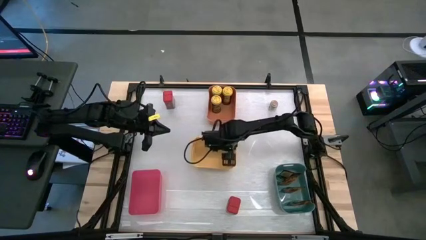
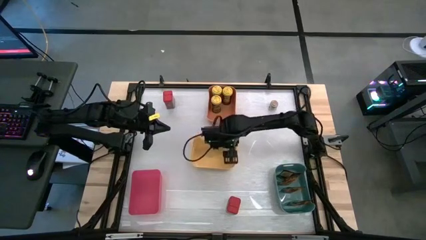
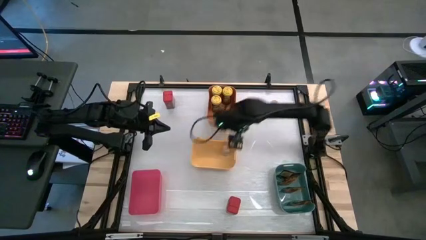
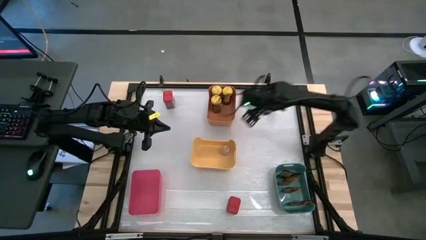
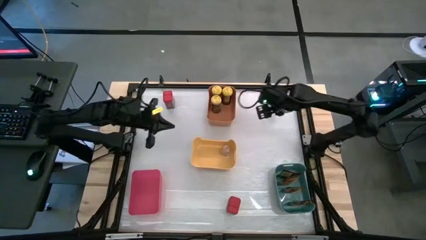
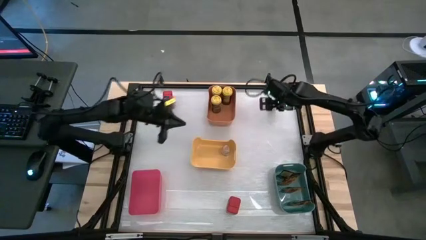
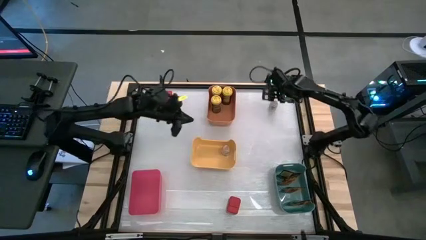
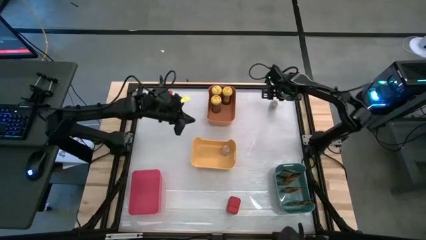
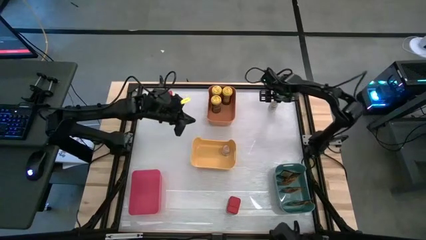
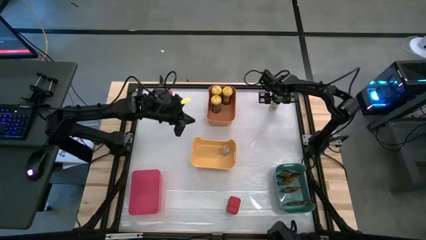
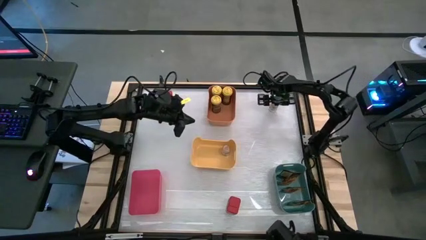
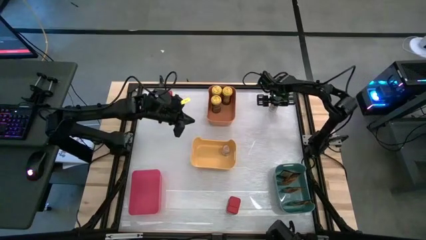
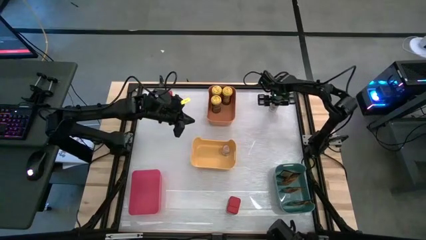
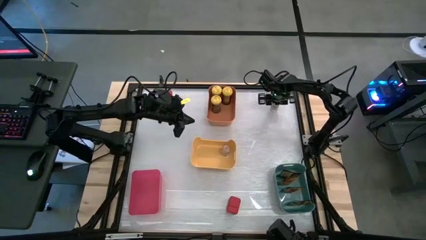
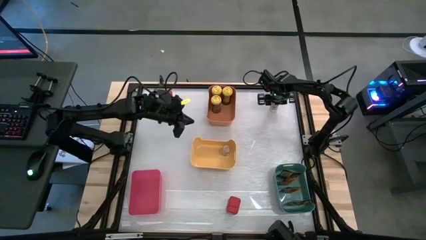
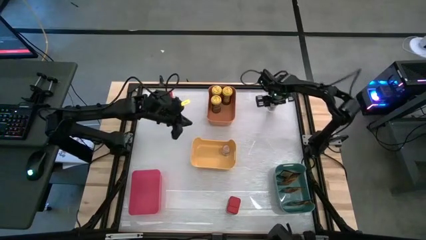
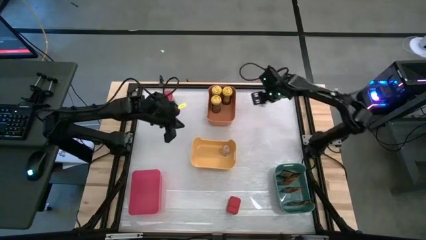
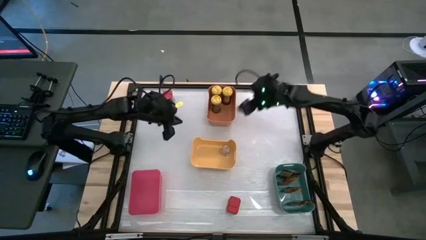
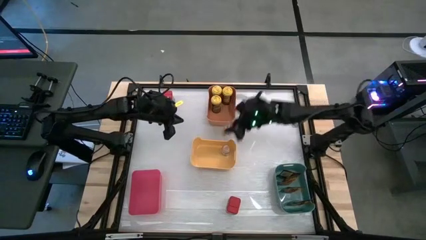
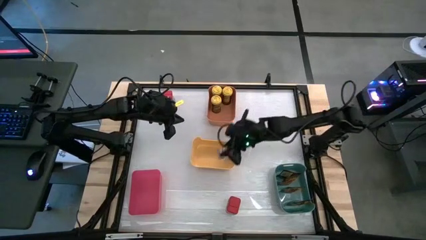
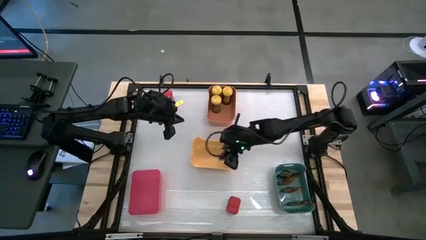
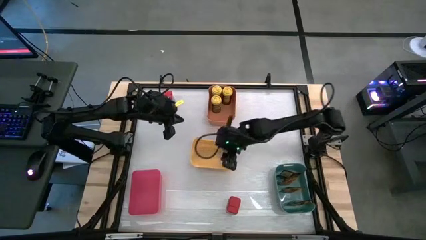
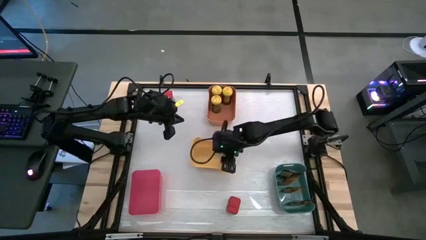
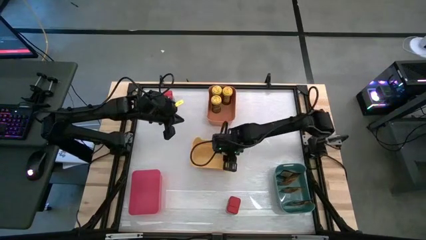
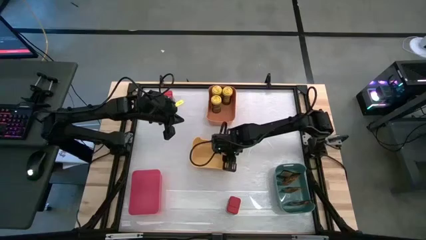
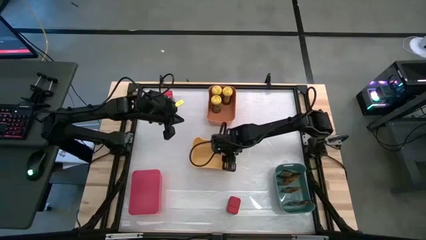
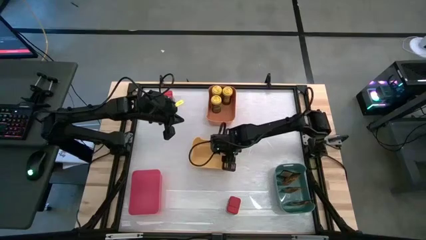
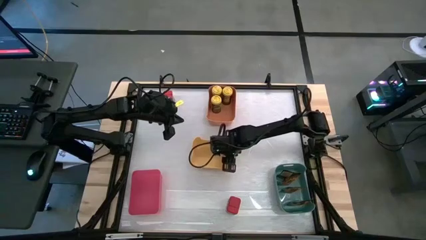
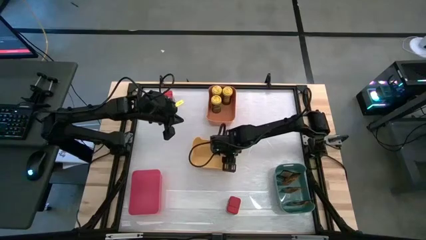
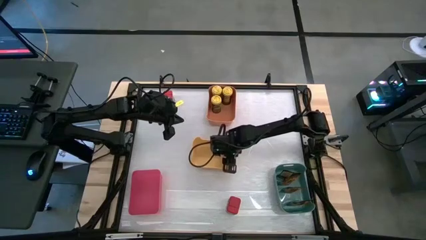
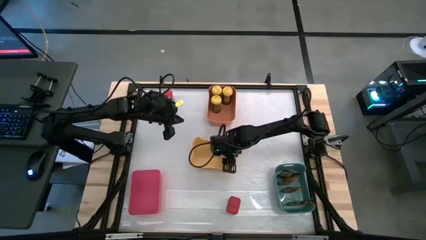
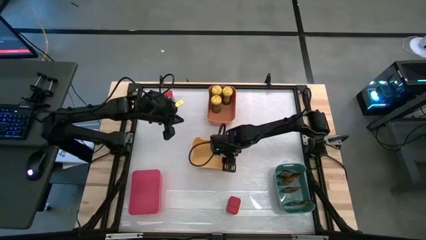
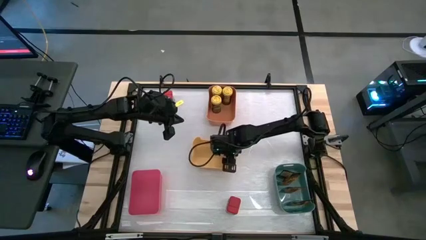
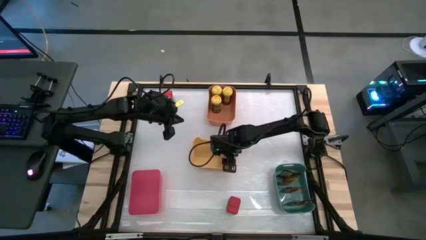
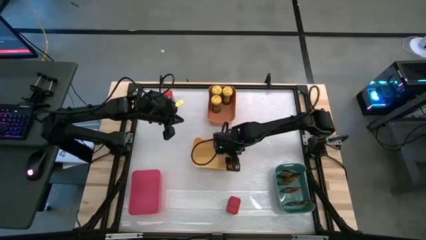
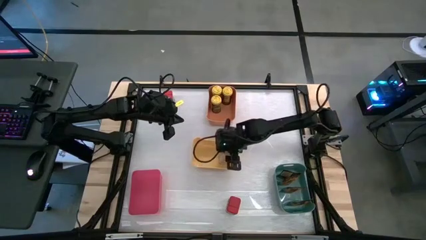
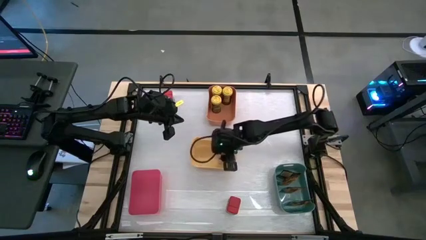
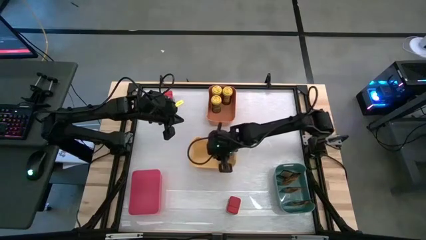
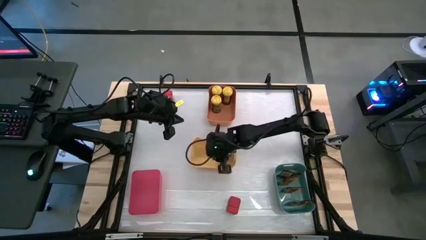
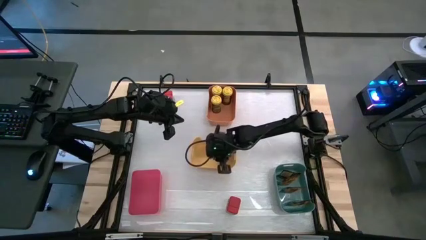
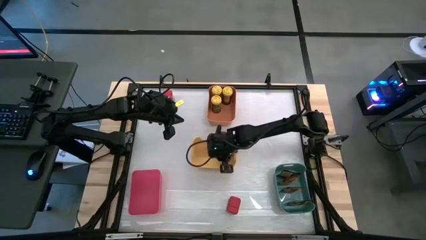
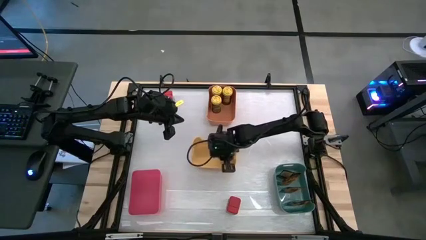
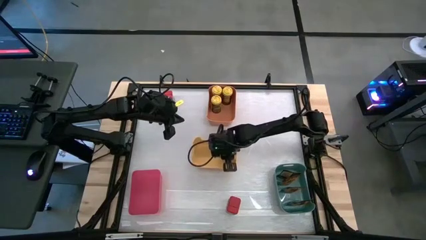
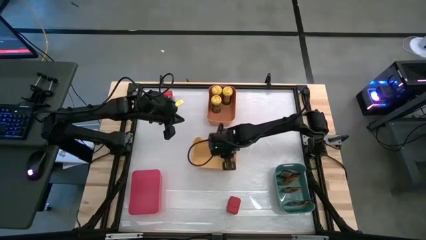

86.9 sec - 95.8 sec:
Task: Sort spices by type
Put the brown seasoning bottle into the yellow bin

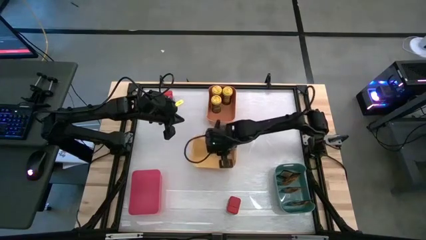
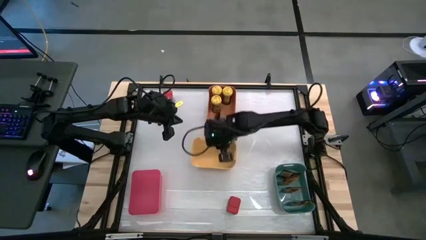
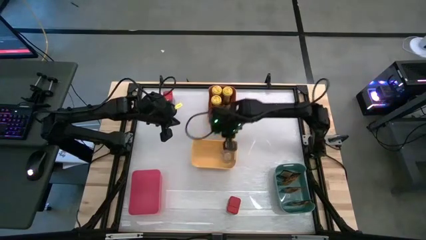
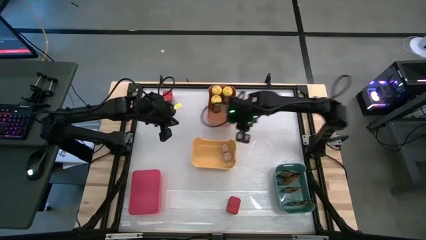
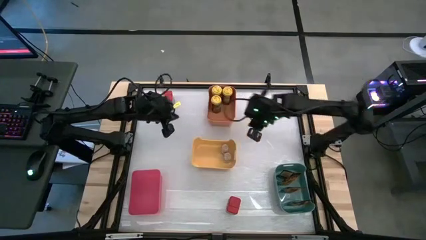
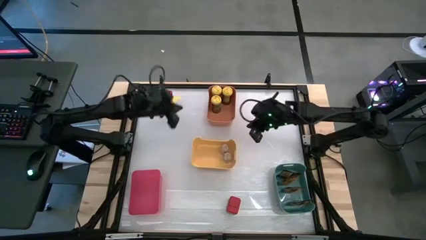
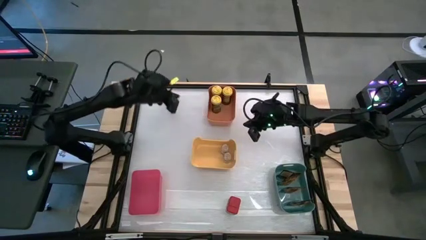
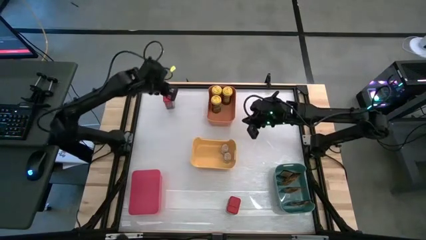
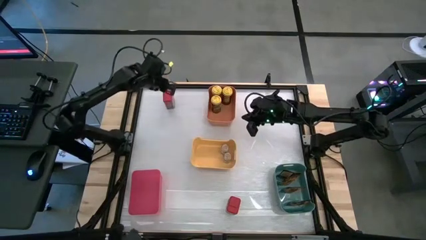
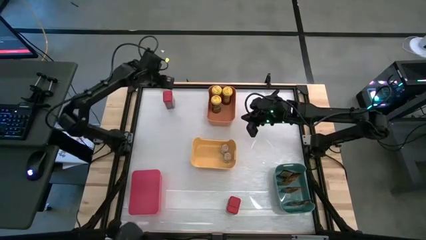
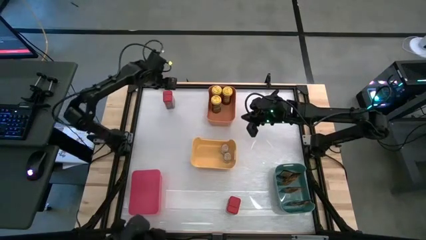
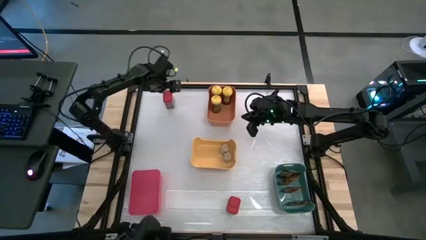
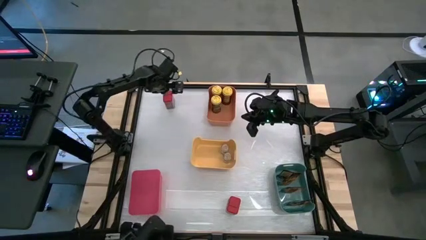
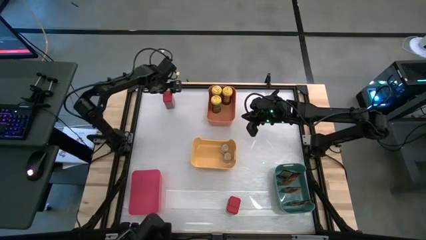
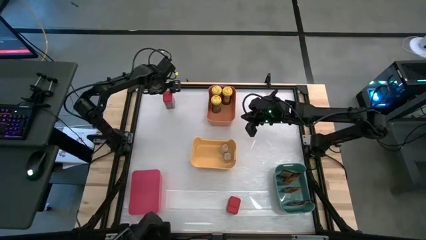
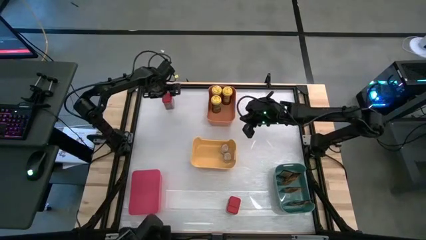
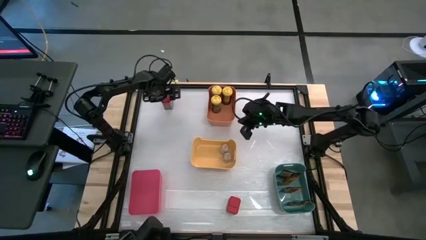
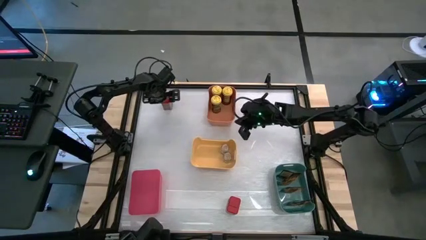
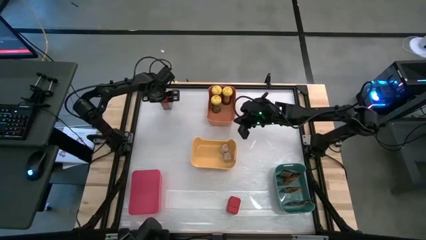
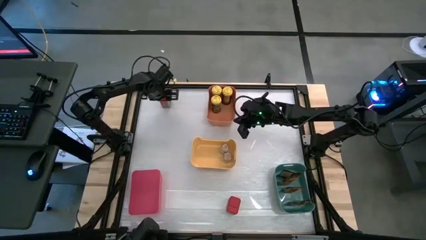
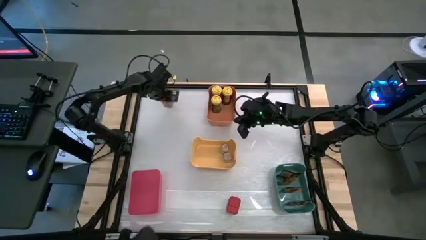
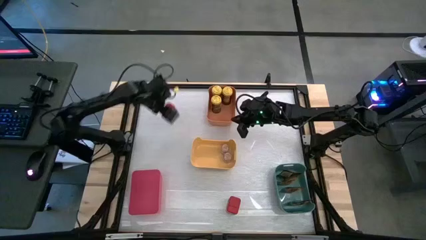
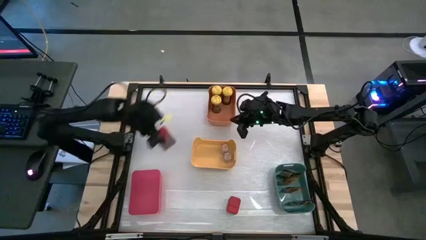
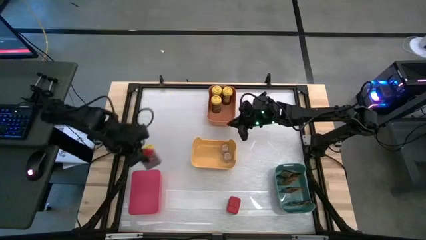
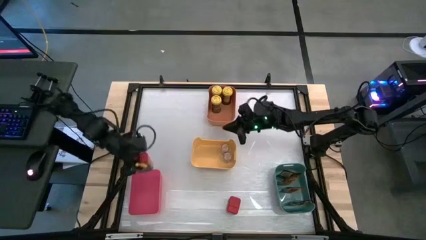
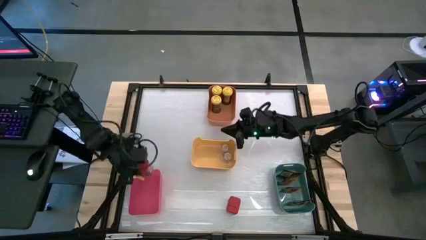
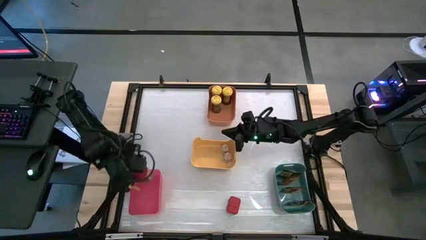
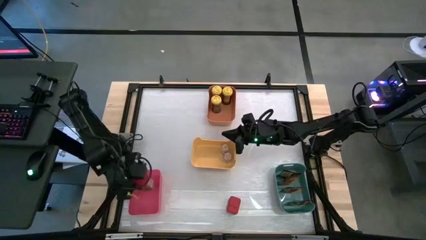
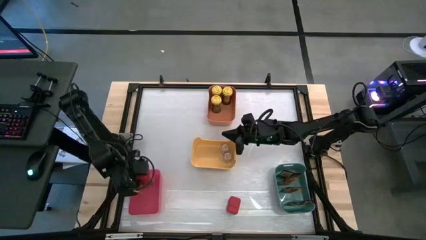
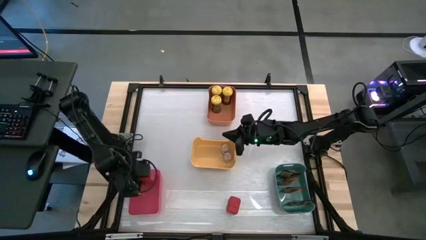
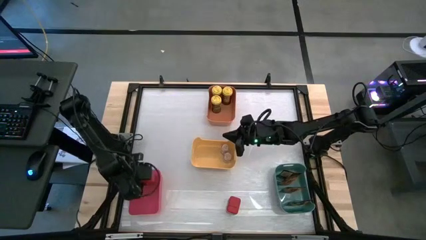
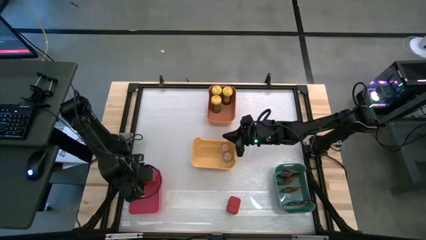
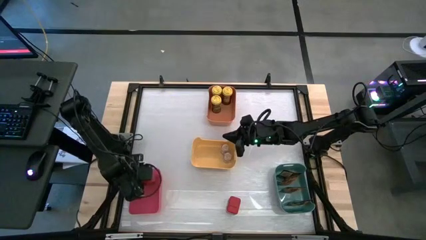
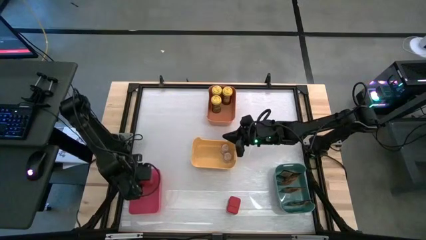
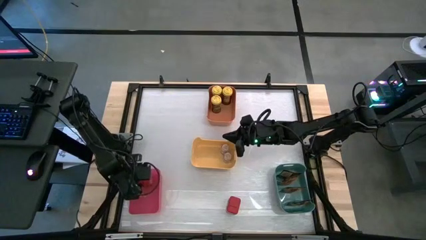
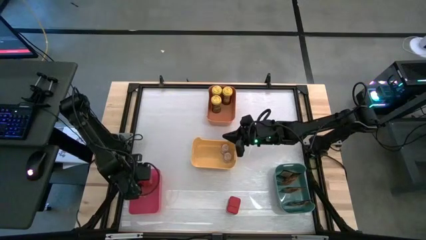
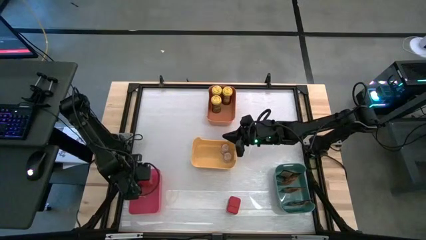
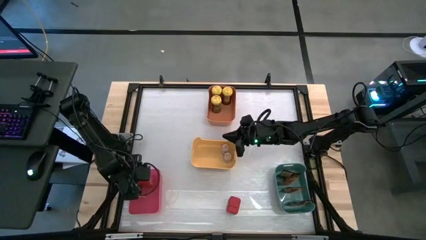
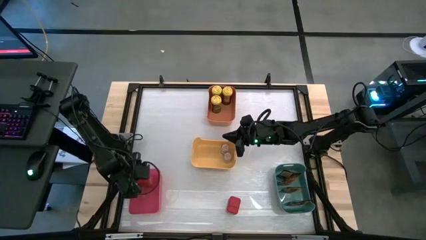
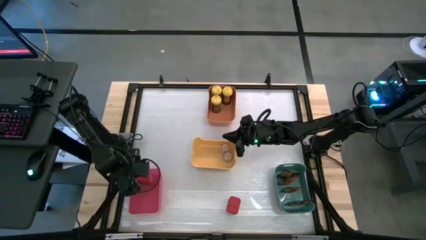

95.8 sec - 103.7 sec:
Put the top red seasoning can into the red bin
